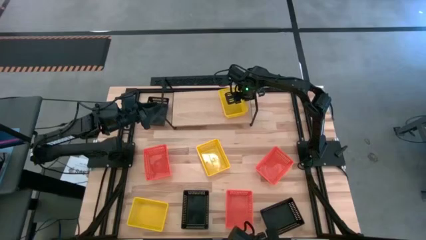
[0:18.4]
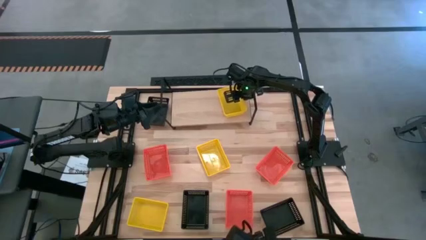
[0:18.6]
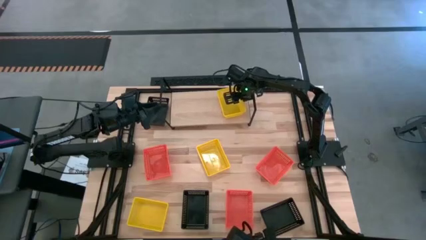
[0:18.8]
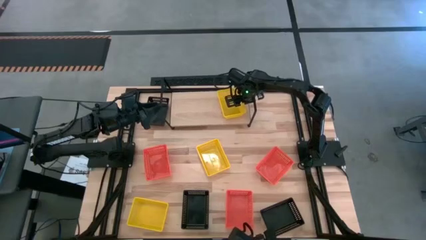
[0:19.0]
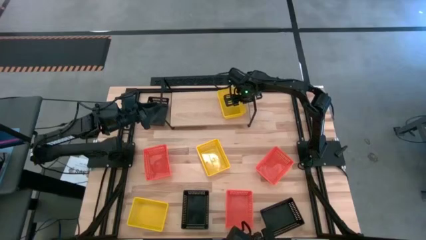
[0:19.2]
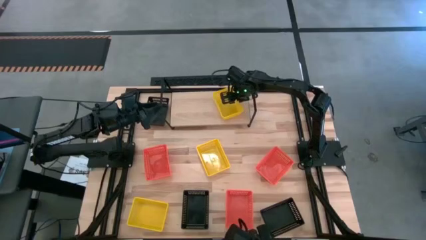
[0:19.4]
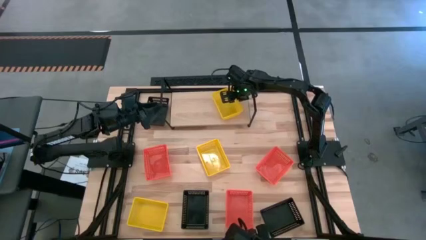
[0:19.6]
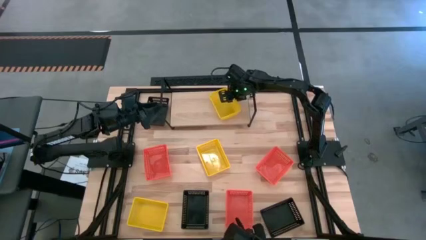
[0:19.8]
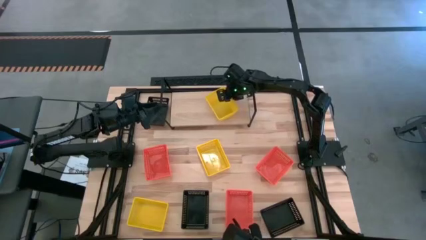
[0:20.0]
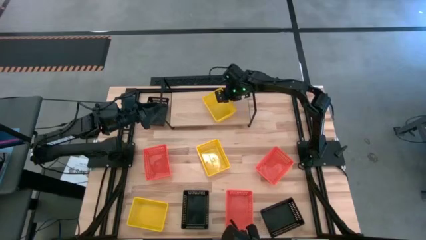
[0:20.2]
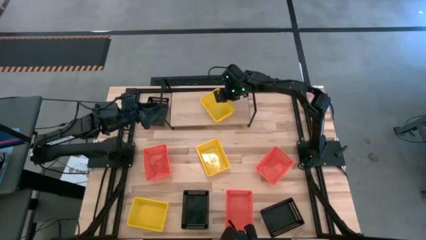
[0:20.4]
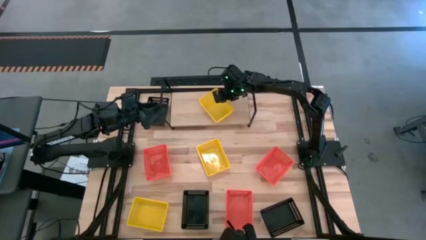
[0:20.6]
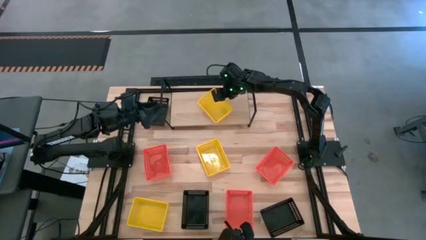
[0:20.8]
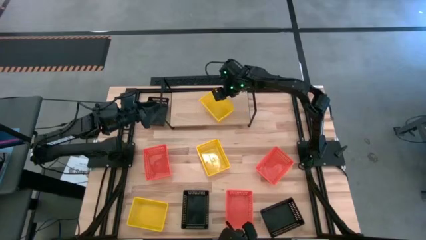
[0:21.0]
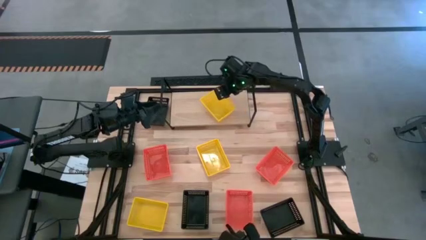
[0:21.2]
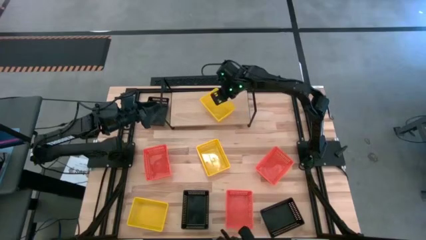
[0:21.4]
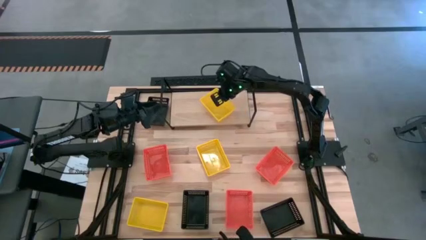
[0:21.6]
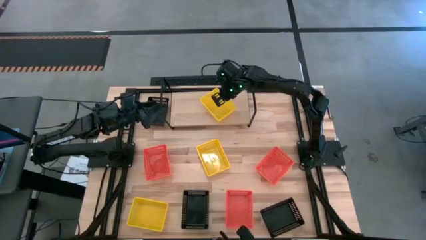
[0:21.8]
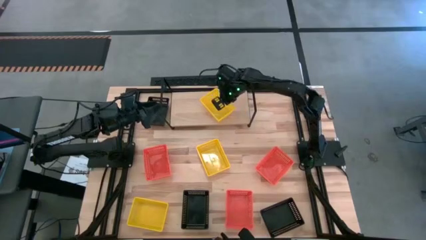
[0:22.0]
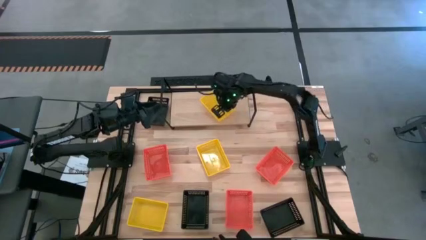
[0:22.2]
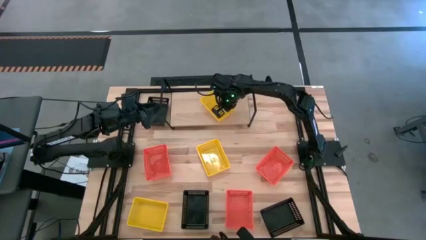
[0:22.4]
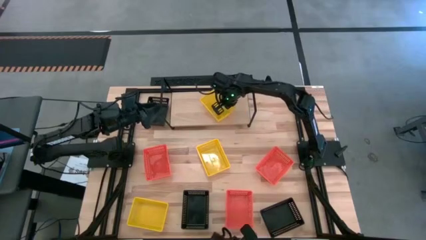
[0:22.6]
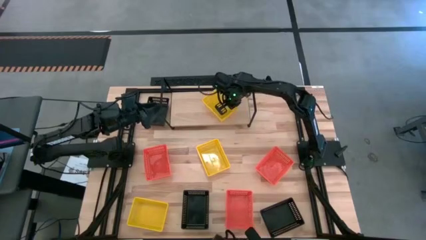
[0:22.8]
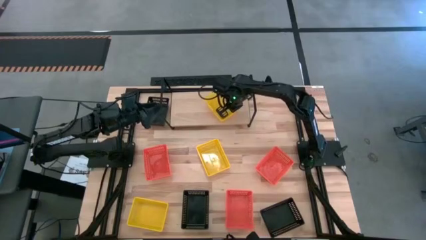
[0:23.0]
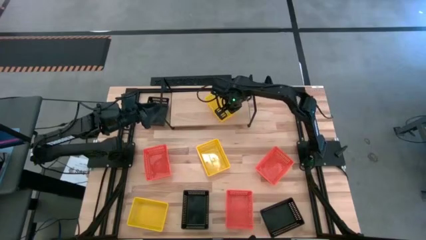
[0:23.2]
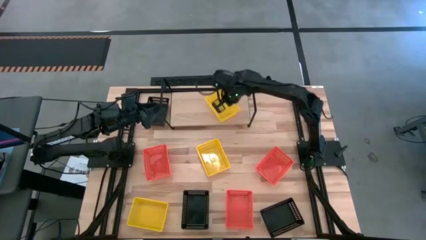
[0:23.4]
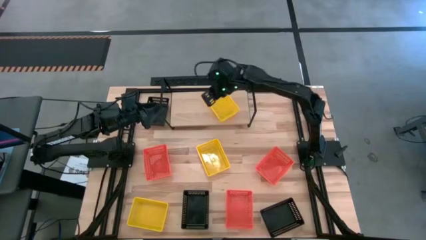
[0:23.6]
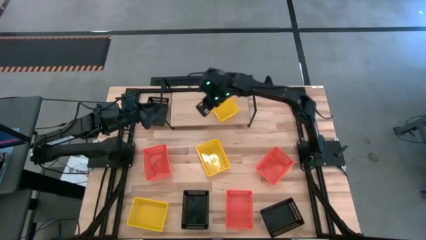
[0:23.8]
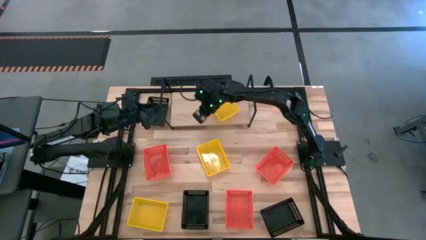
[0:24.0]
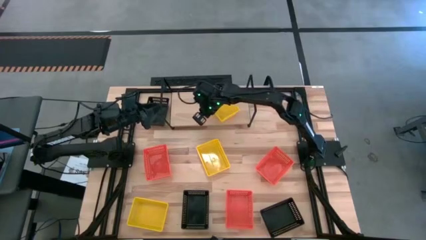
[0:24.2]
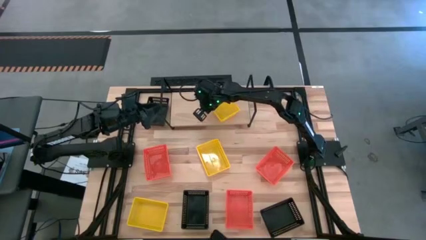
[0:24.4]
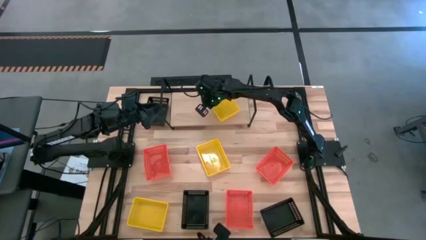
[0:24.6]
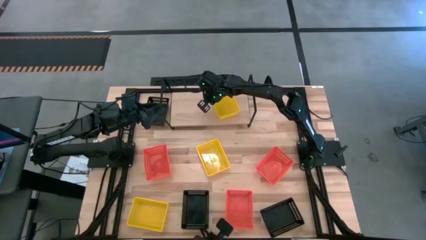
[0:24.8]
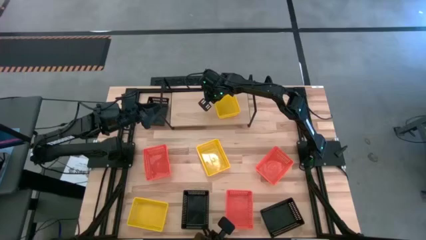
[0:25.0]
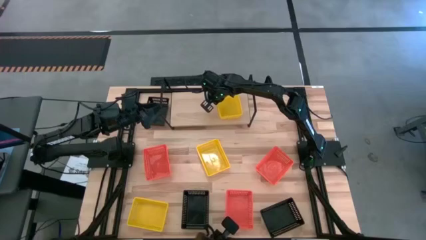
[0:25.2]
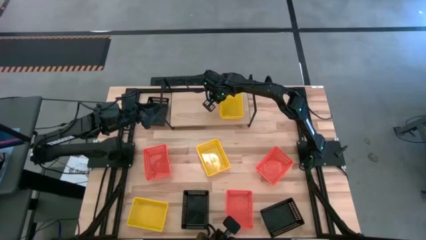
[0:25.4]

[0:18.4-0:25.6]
Task: Stack baskets on shelf by color
Adjust the yellow basket on the shelf

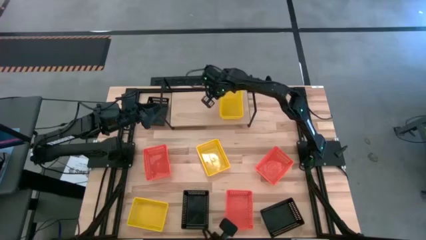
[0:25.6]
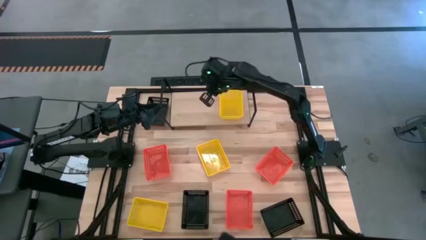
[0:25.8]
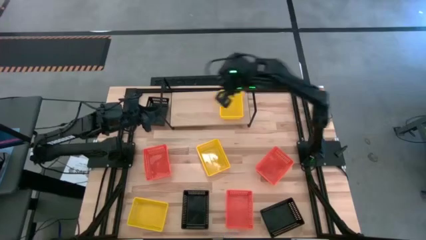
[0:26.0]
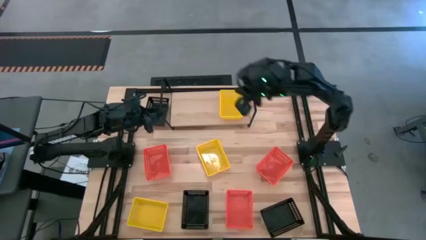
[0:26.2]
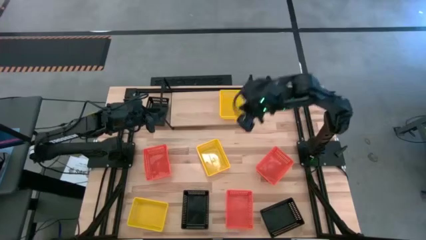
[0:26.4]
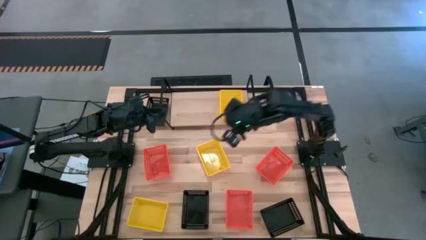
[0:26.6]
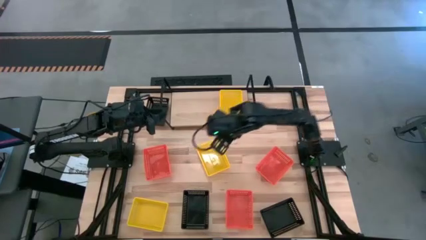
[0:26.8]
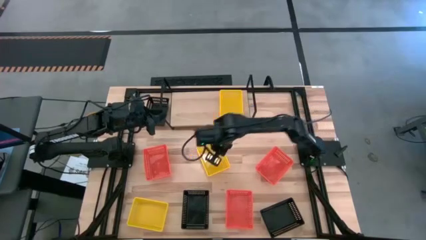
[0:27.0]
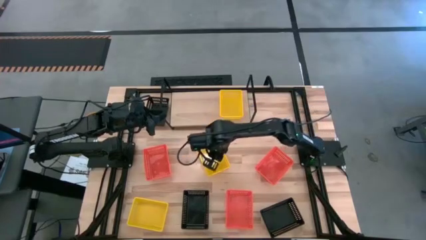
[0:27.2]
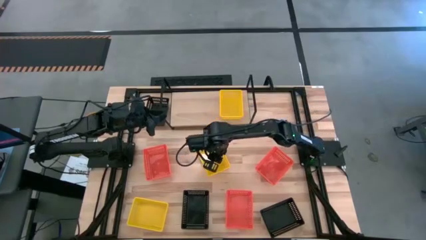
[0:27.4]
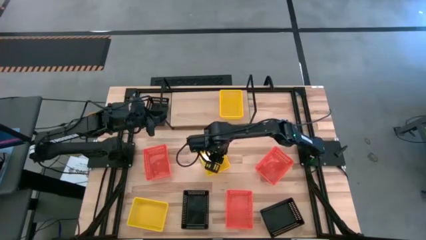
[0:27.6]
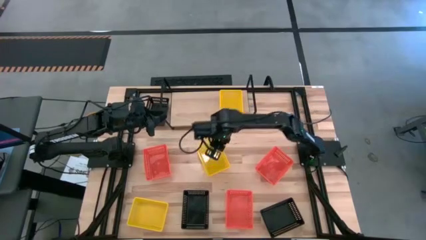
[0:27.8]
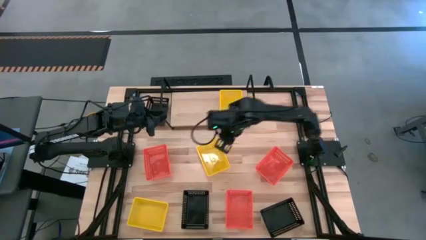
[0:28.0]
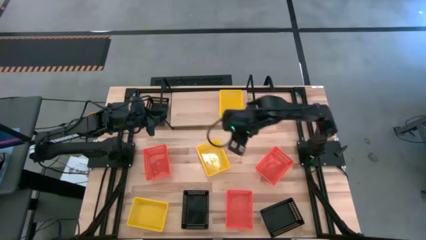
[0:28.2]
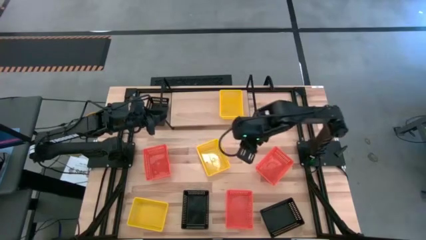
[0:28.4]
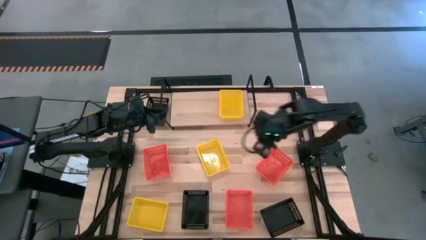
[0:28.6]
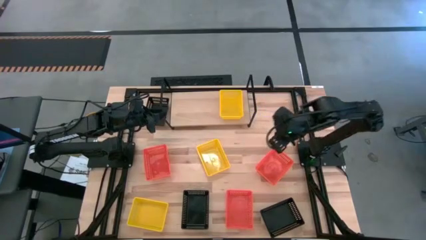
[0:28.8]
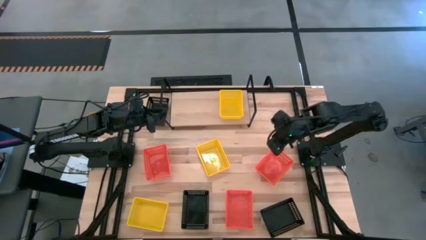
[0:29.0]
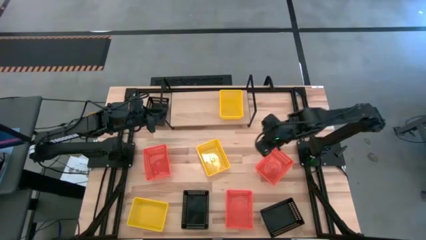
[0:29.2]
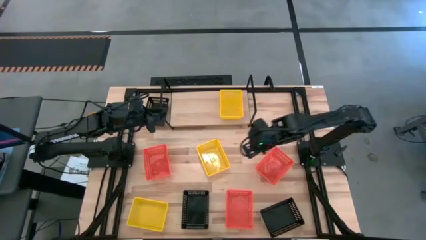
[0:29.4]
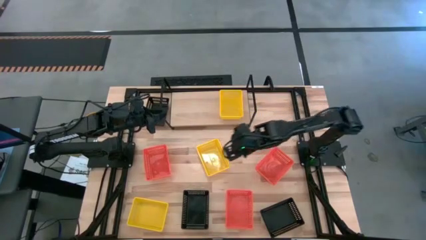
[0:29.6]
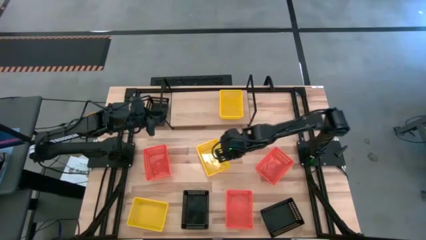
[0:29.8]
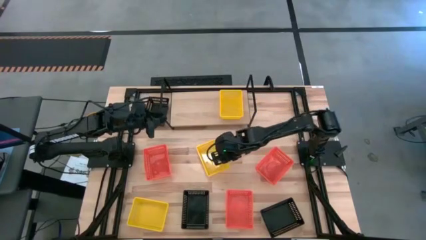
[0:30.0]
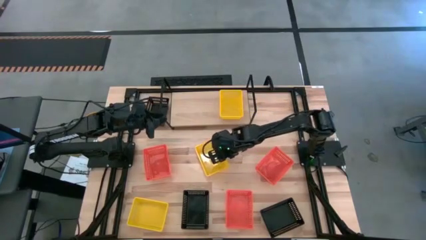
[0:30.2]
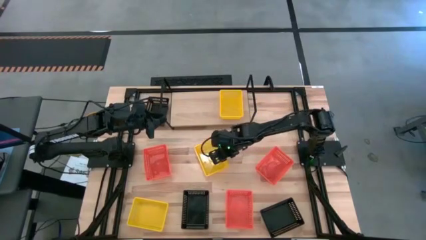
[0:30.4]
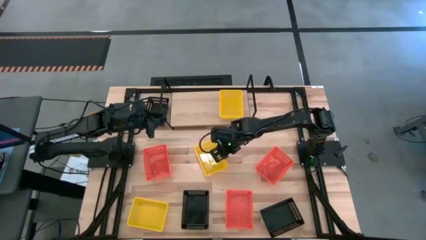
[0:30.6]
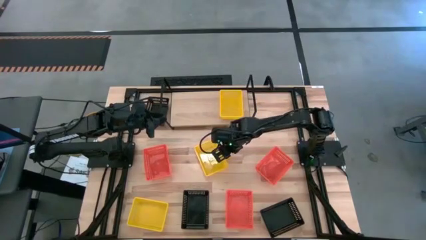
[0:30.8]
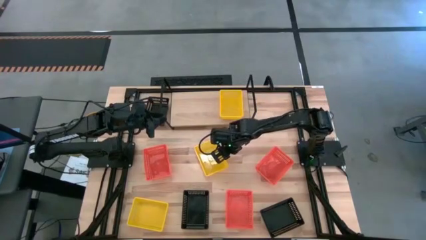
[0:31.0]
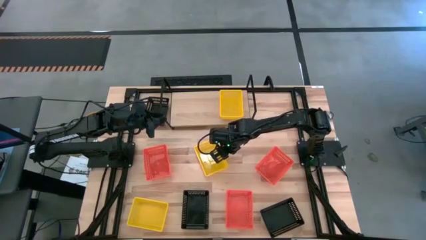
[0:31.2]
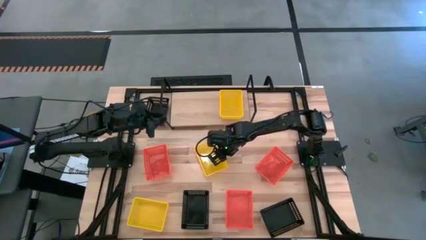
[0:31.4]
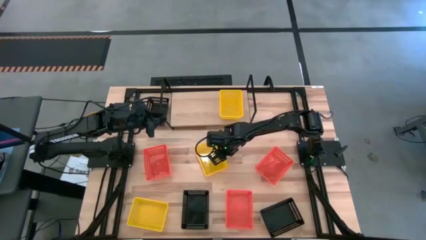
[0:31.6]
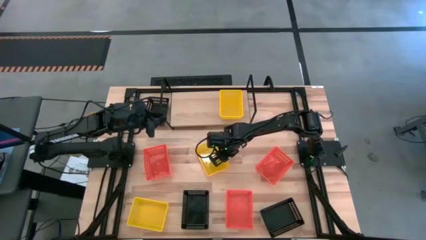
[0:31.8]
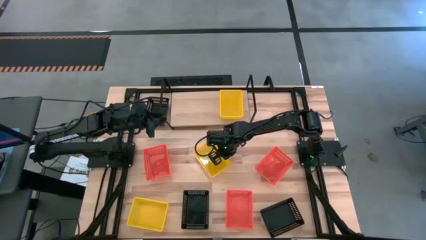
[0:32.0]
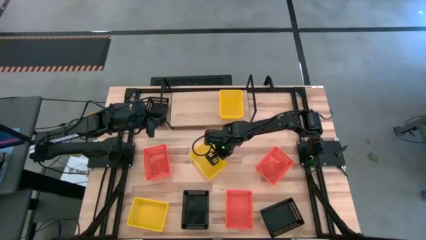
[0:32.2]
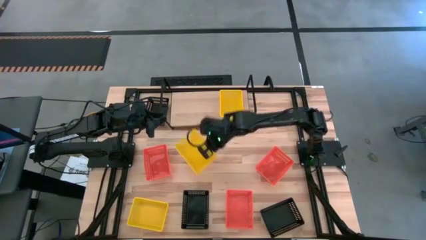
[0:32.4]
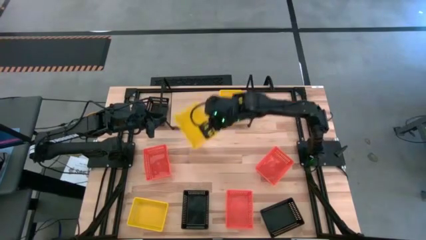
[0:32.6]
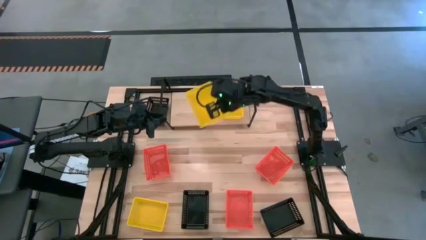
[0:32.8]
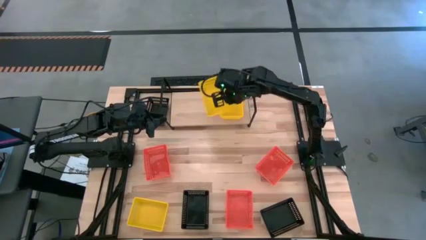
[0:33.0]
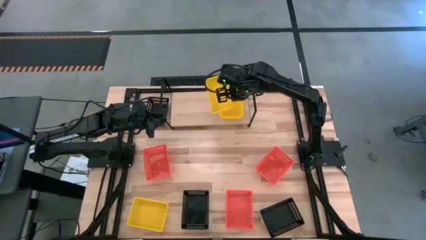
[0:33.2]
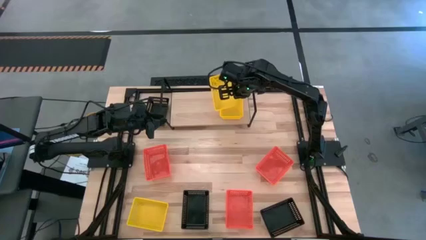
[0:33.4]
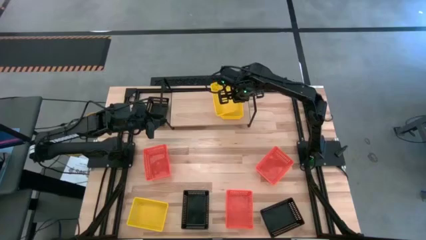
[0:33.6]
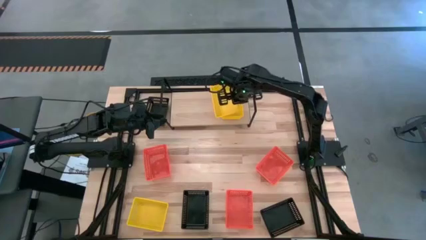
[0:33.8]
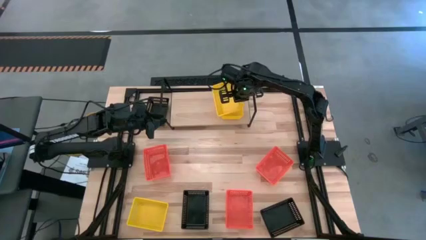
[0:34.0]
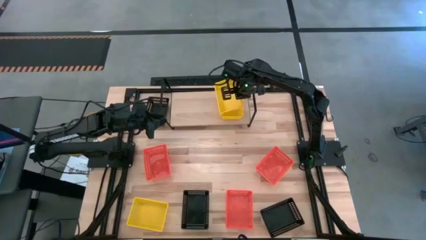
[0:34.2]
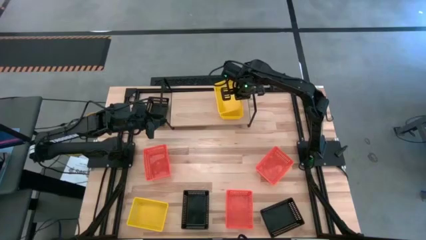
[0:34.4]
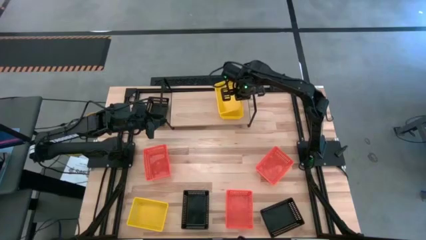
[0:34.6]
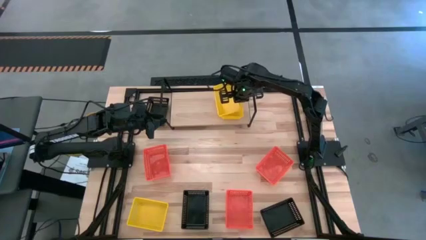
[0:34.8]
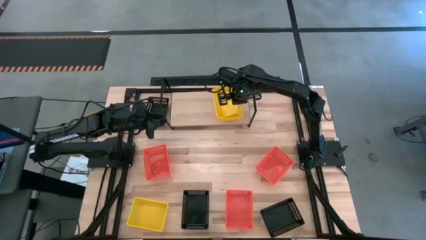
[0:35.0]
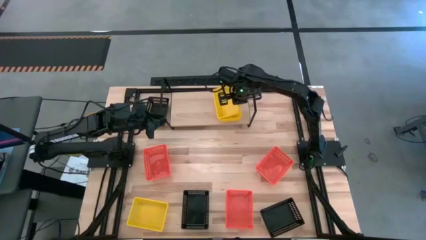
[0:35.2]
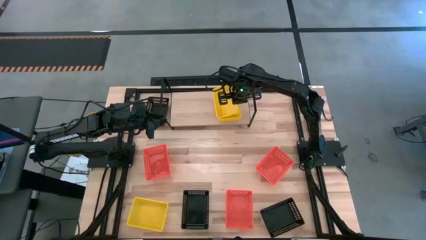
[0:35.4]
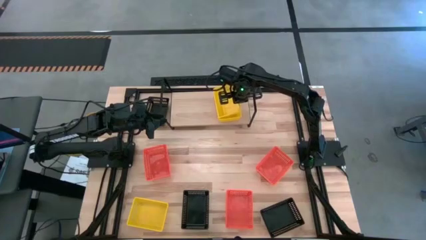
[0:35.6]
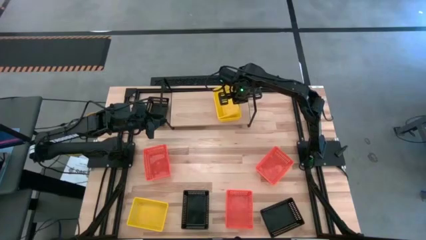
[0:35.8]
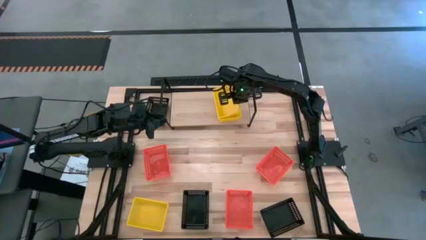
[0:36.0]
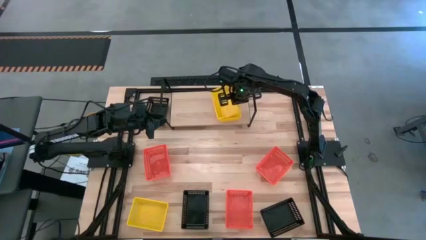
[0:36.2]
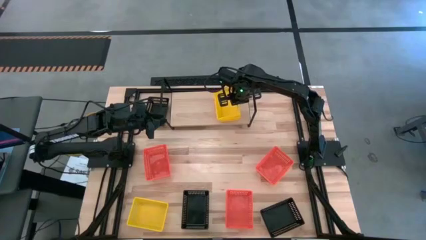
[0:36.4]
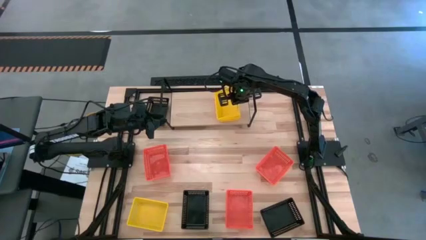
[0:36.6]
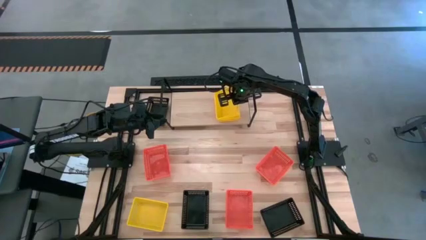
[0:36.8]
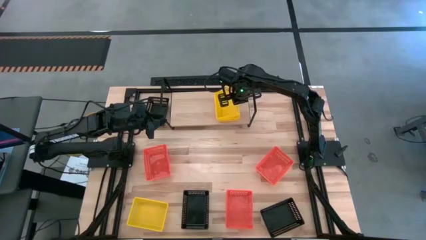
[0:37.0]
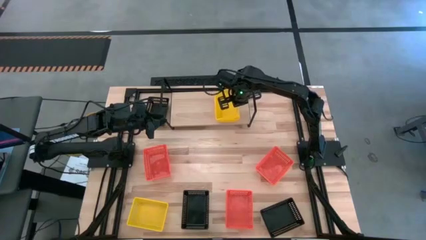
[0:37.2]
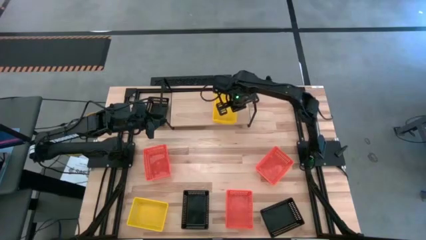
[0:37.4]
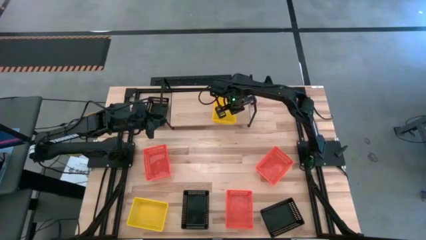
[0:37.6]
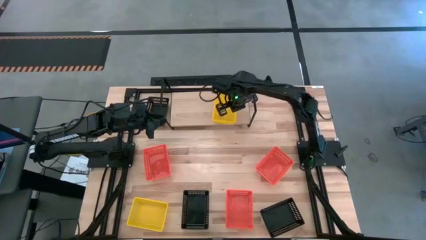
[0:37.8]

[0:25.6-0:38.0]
Stack the top yellow basket on the yellow basket on the shelf
